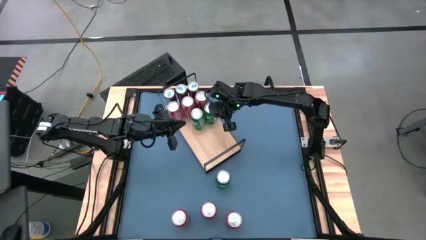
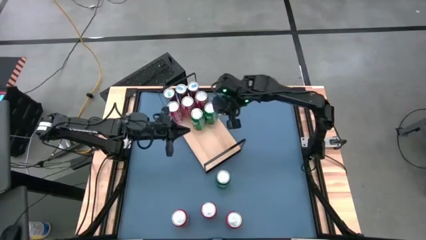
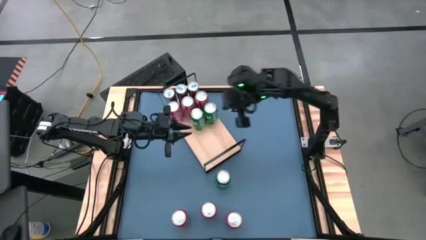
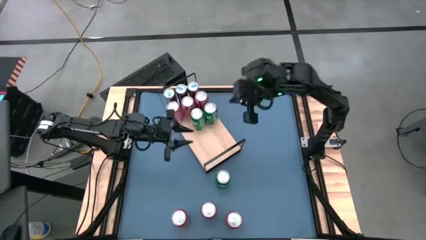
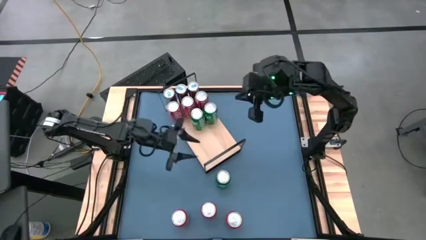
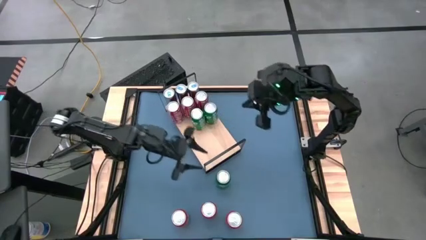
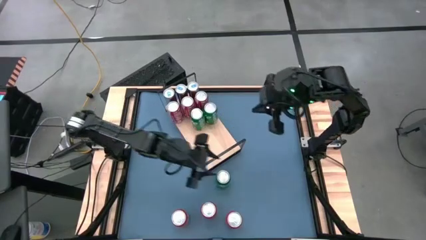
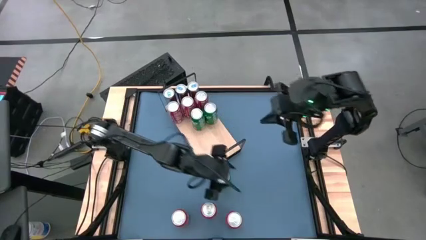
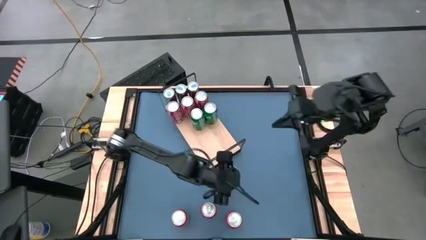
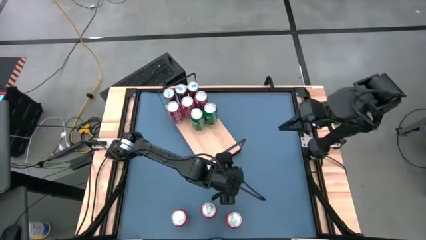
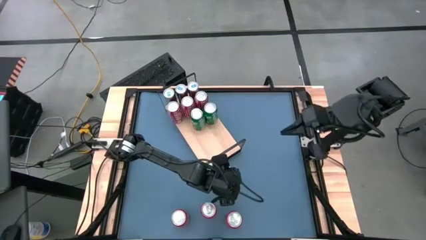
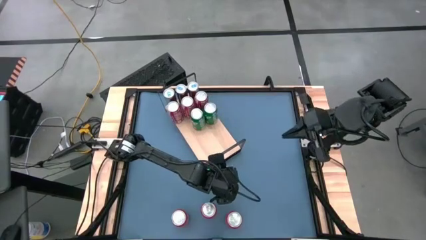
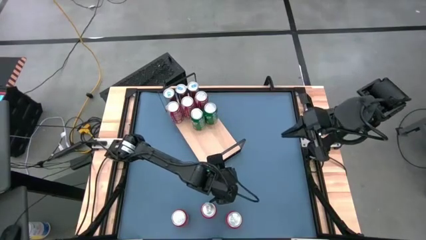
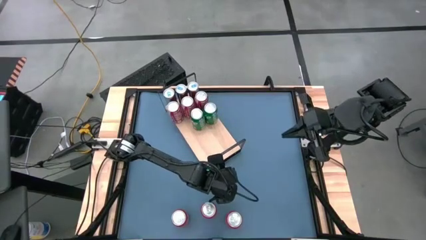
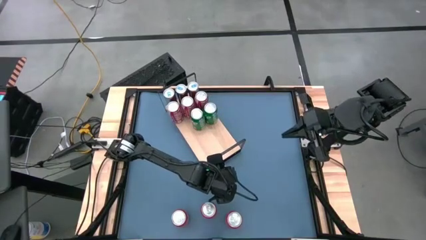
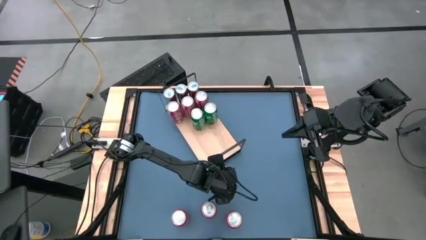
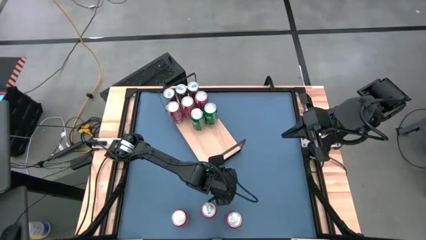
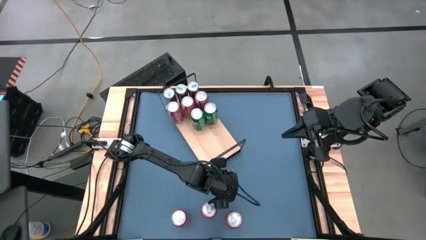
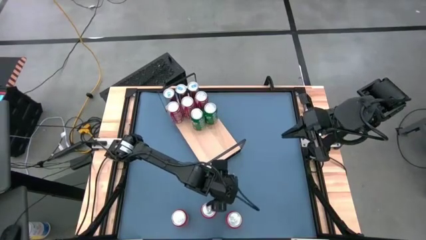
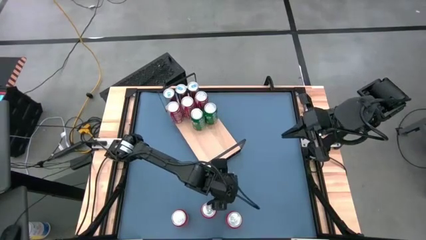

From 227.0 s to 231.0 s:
Task: Place canned beverage on shelf
Put the green soda can on the shelf aligned with the other green soda cans

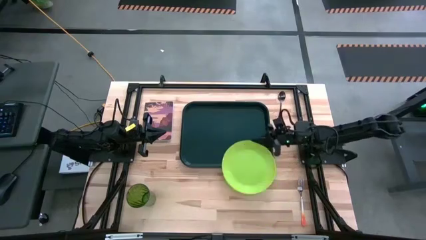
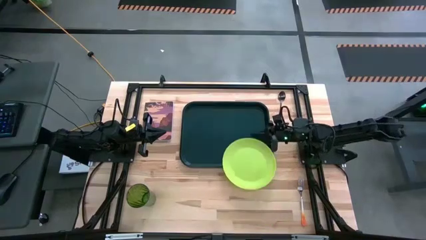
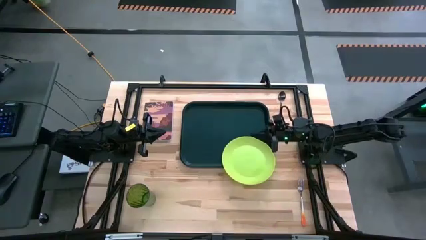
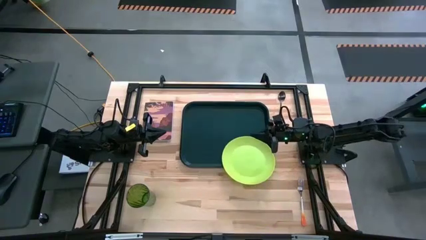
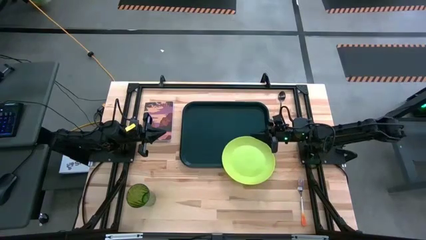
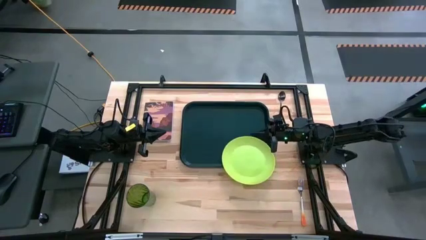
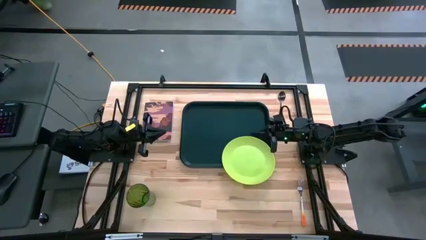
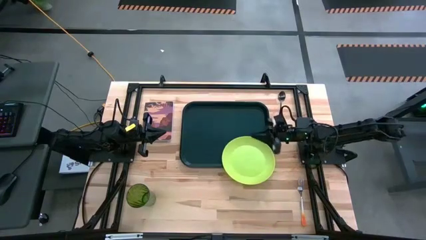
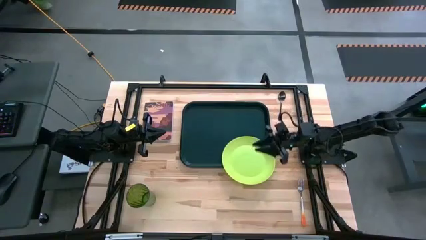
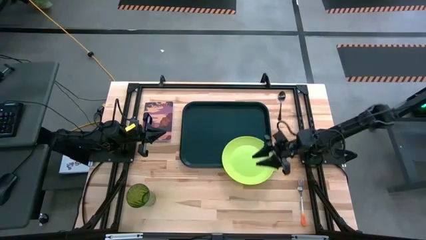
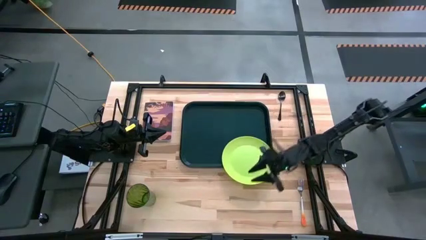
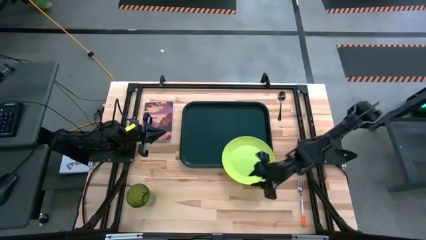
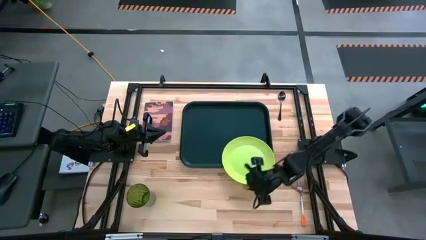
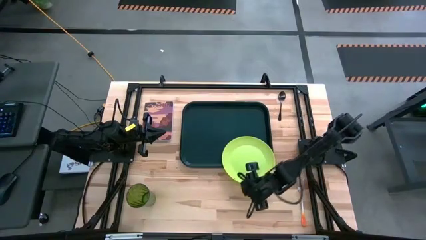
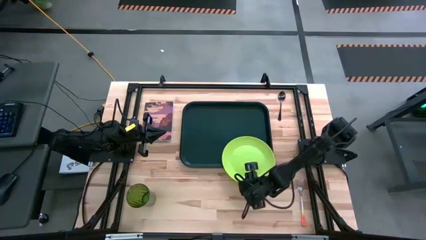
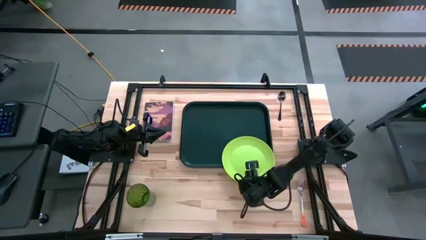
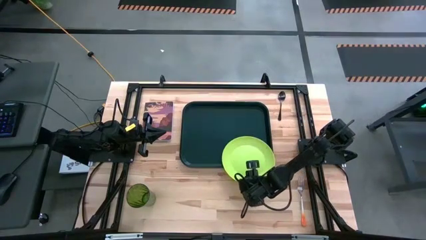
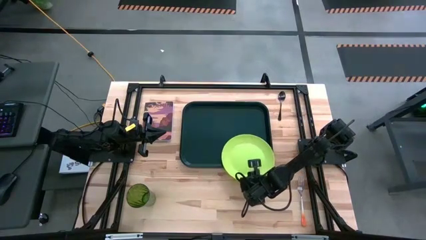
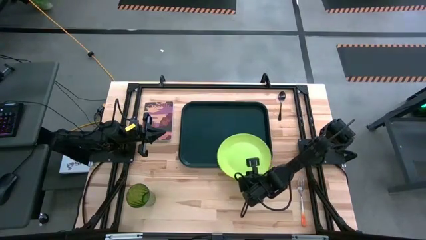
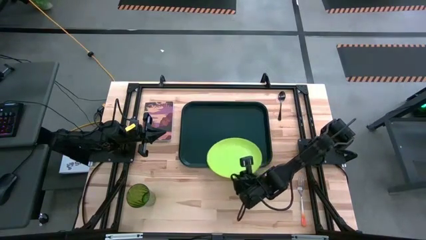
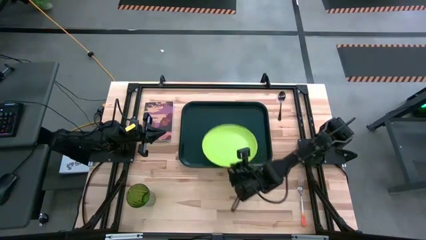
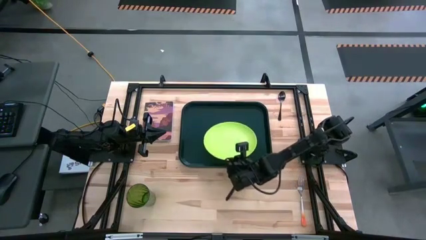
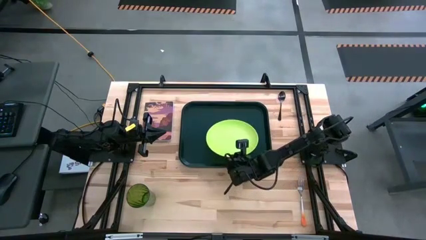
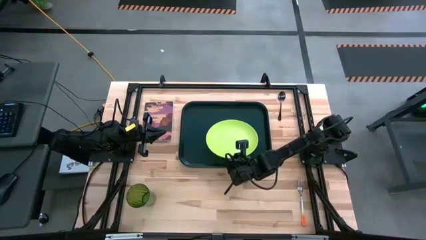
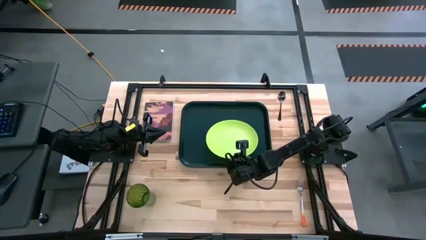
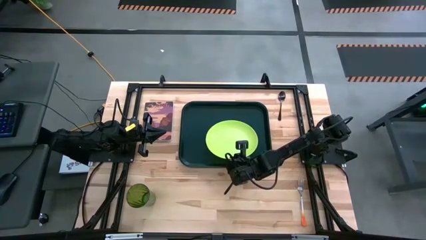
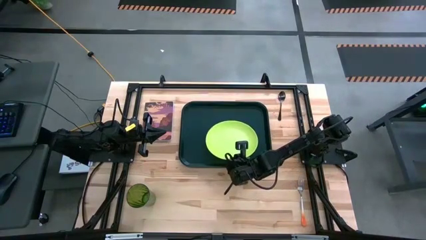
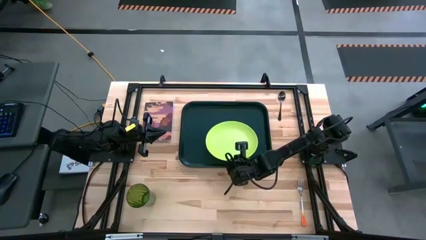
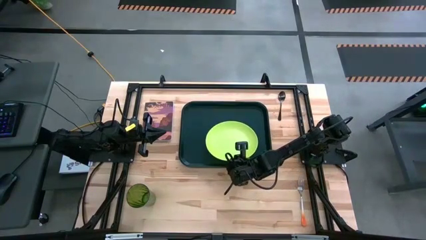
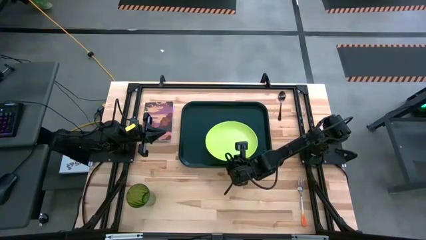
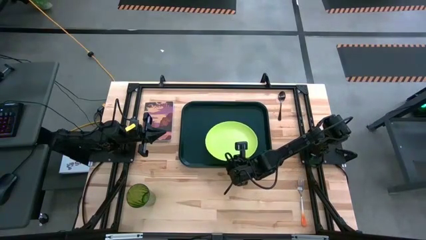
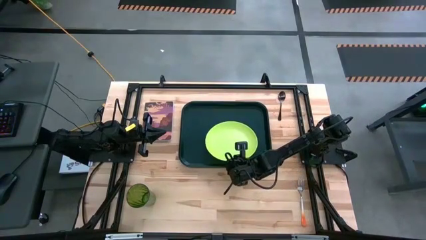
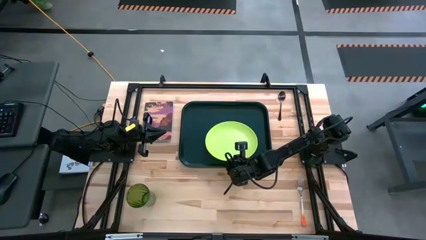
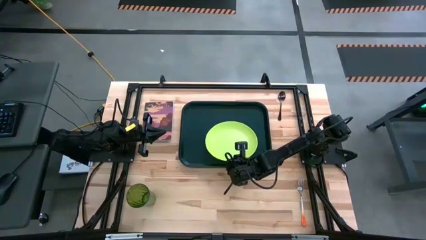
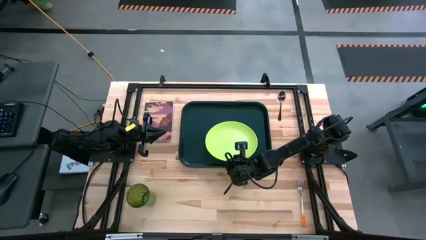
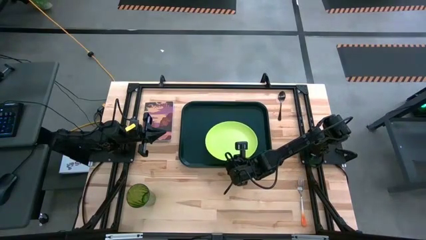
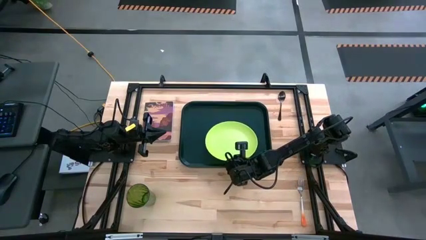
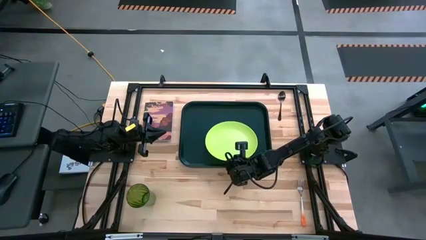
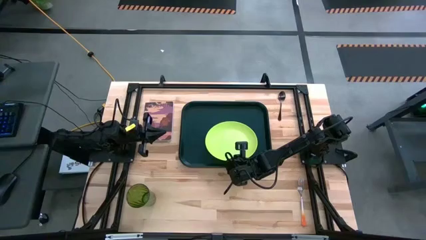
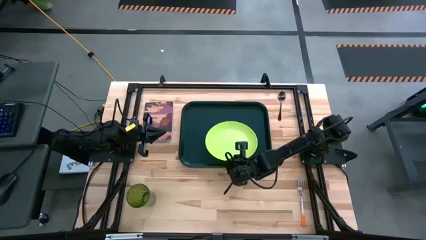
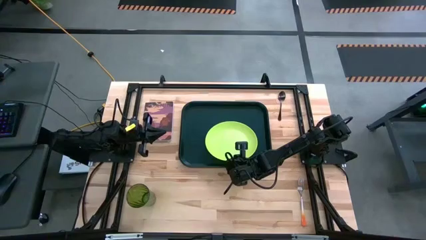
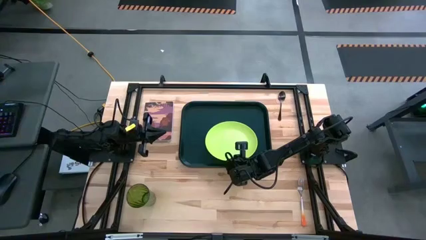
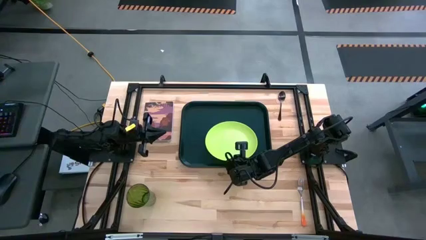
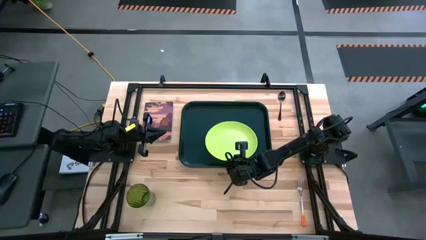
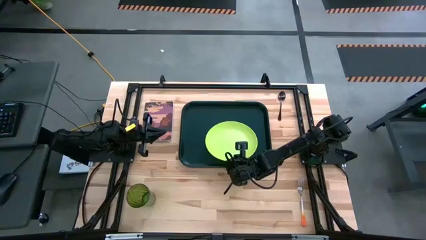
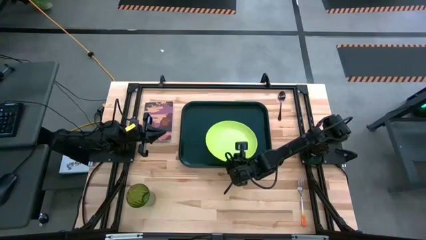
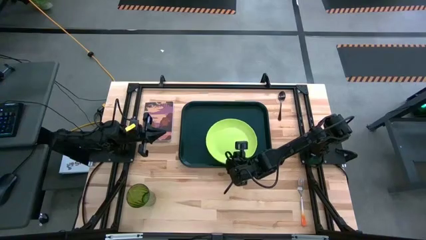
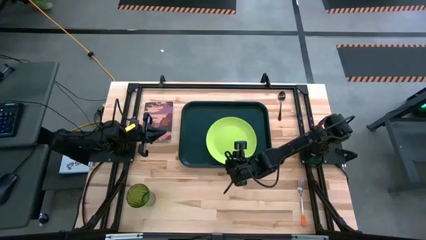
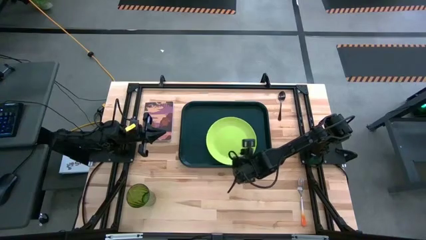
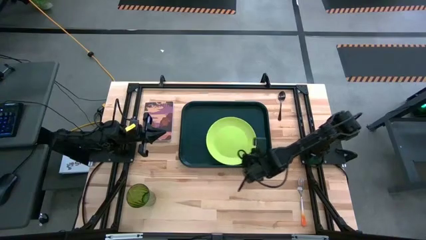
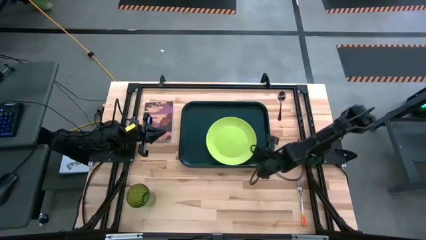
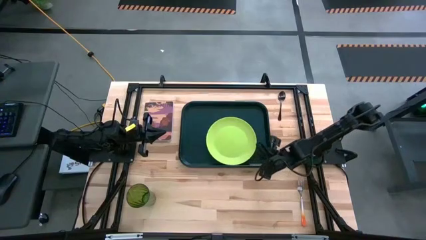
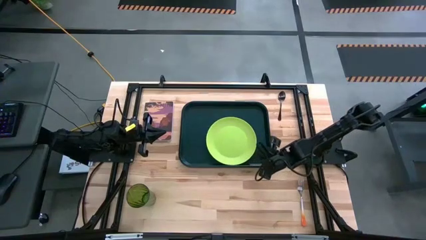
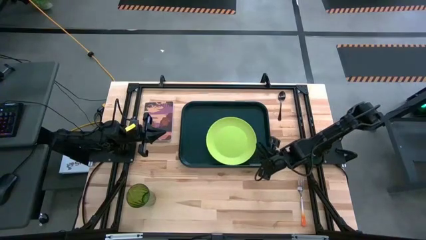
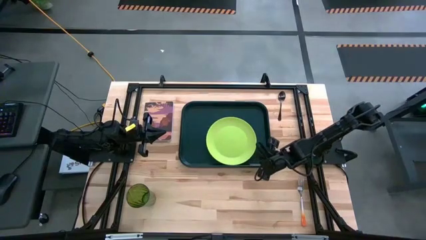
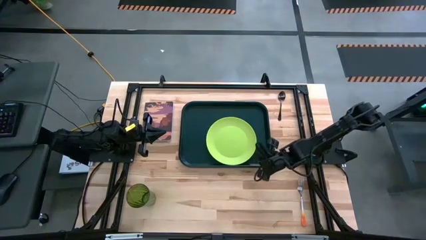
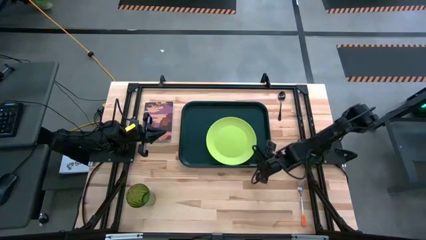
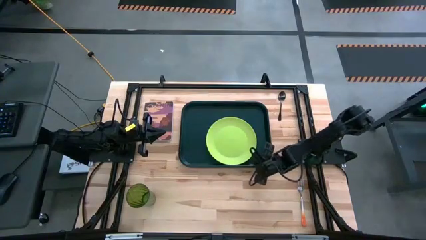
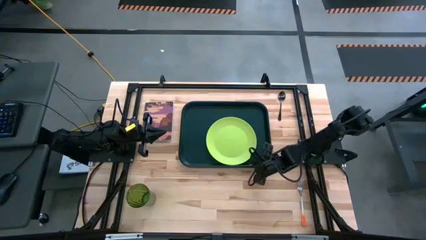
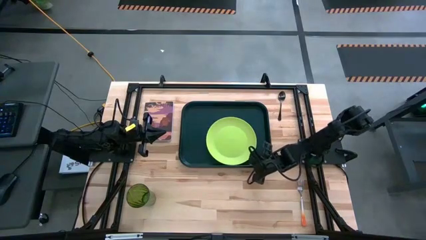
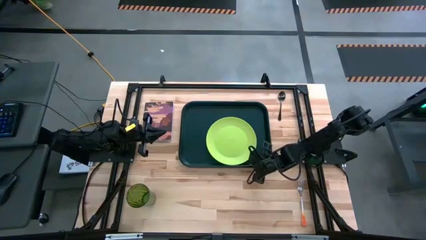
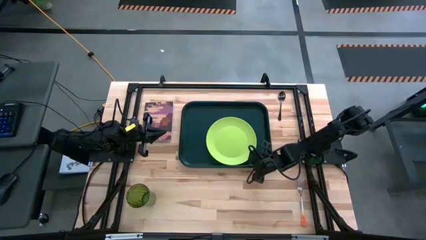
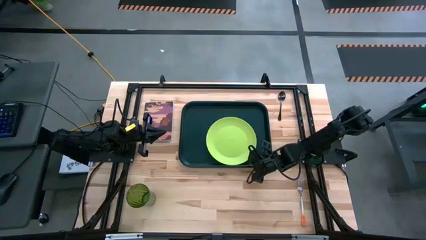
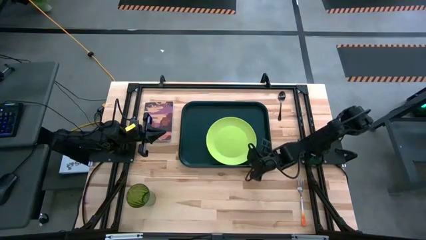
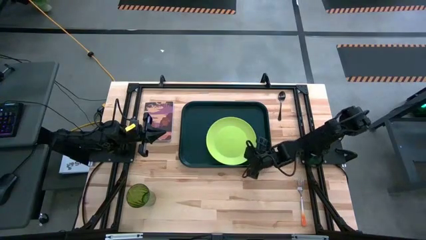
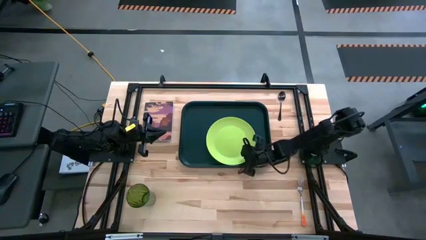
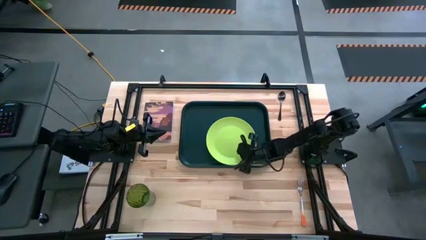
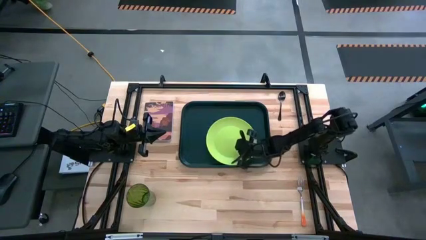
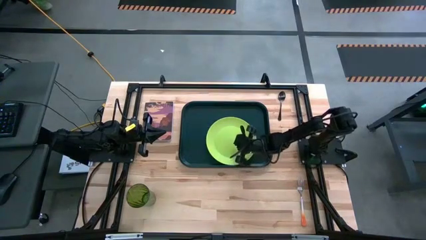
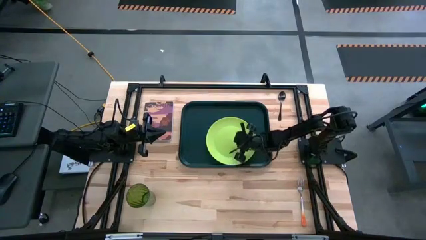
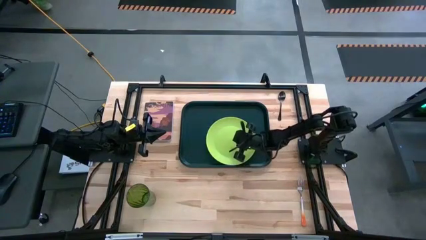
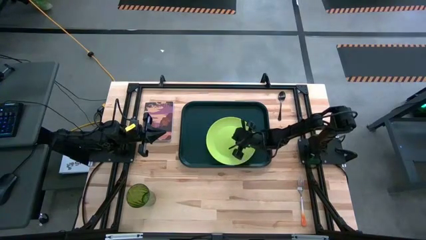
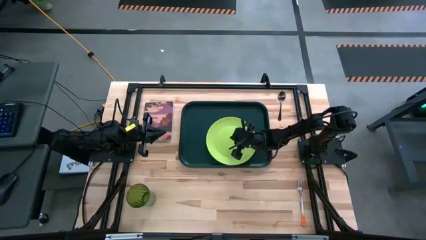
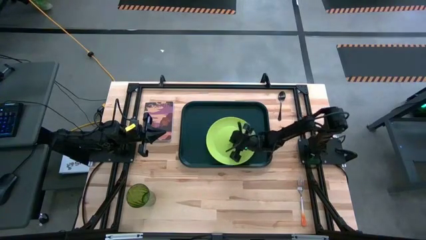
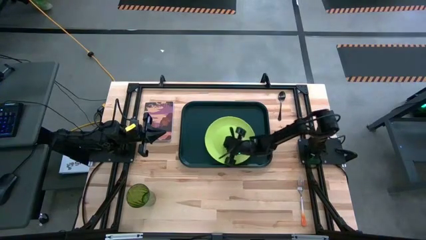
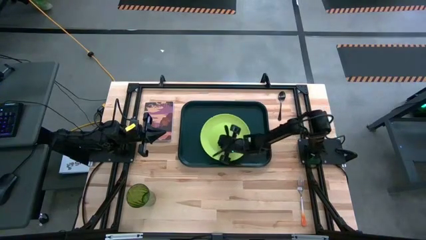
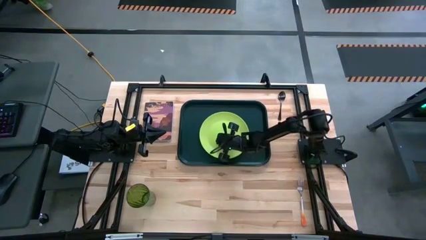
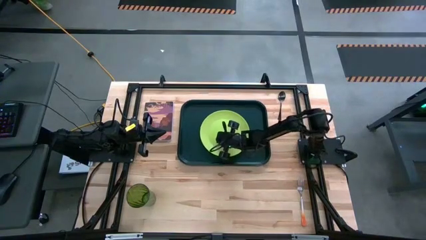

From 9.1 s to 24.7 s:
Task: Pick and place plate/cup/fork/spoon on tray
Put the green plate on the black serving tray
